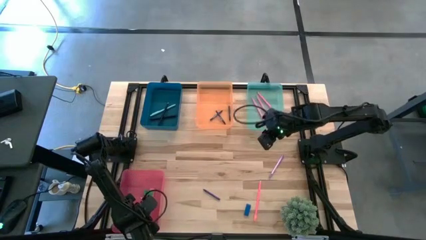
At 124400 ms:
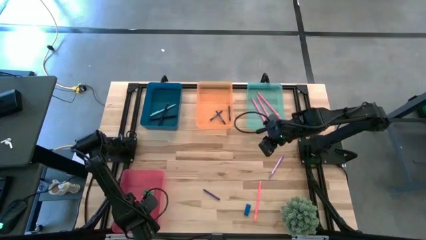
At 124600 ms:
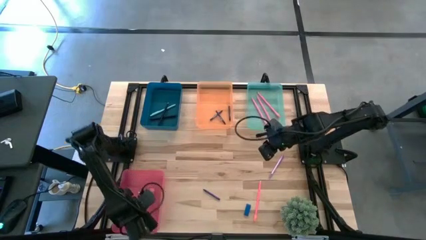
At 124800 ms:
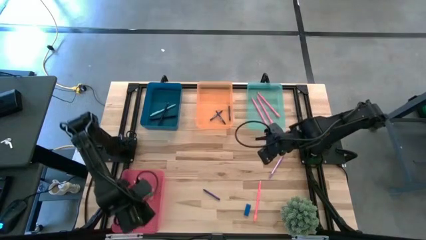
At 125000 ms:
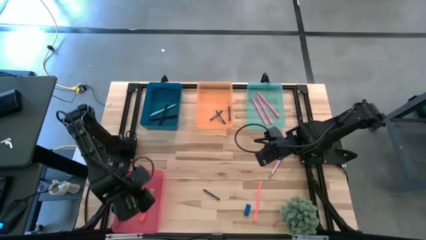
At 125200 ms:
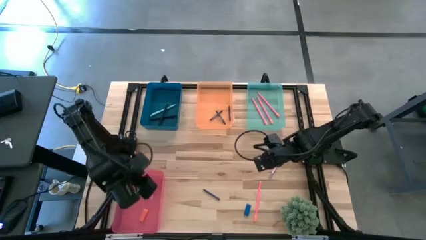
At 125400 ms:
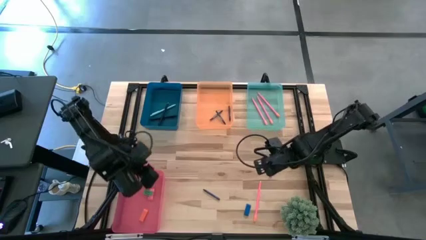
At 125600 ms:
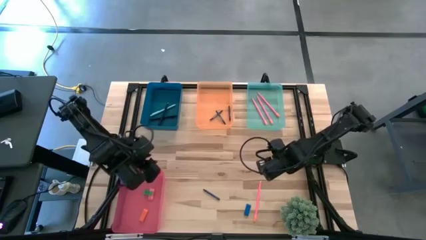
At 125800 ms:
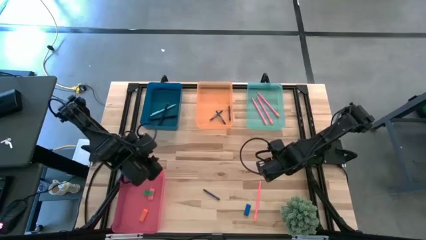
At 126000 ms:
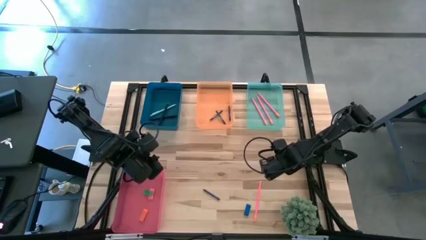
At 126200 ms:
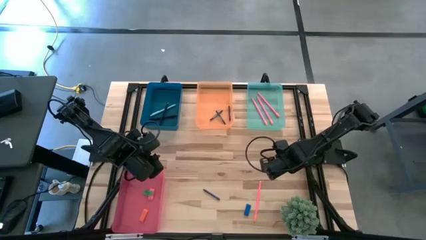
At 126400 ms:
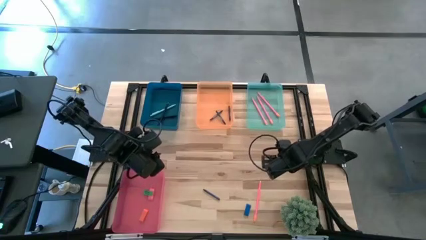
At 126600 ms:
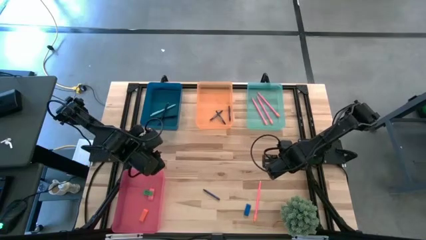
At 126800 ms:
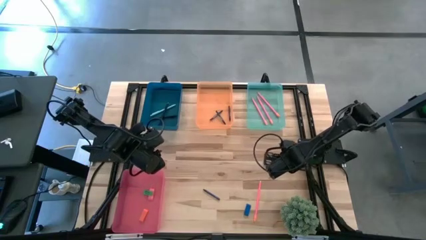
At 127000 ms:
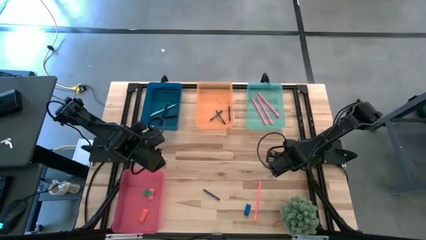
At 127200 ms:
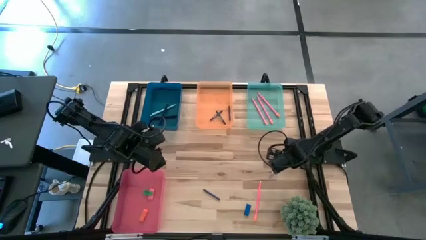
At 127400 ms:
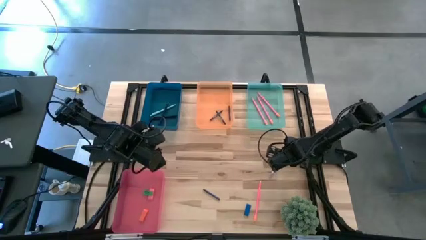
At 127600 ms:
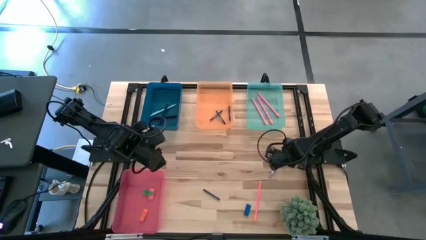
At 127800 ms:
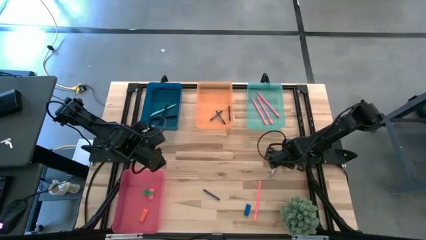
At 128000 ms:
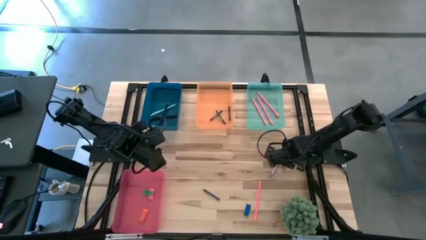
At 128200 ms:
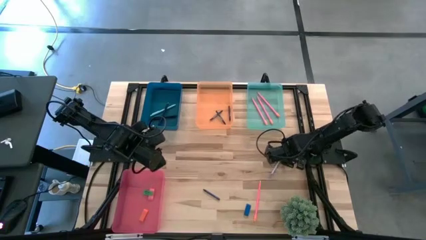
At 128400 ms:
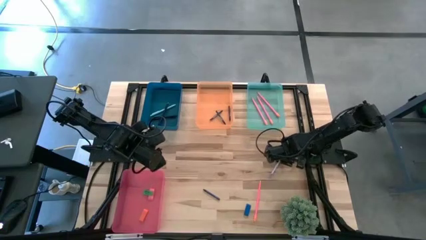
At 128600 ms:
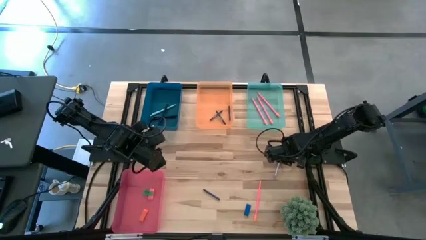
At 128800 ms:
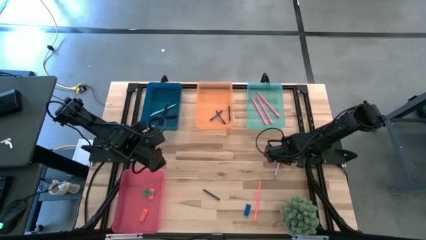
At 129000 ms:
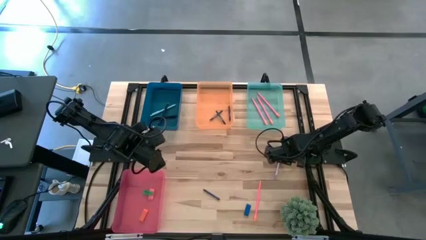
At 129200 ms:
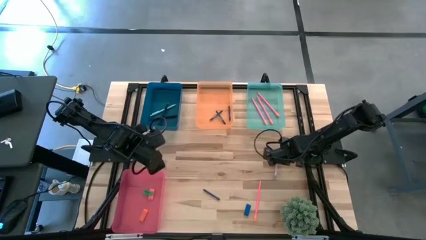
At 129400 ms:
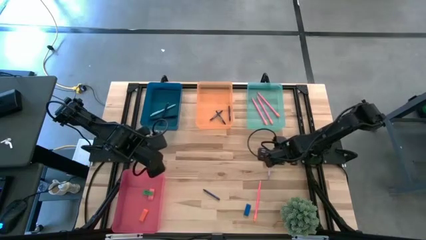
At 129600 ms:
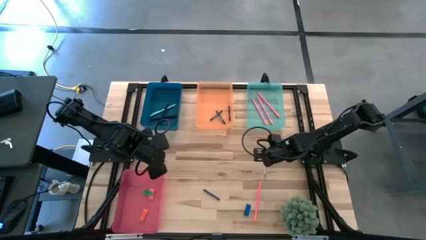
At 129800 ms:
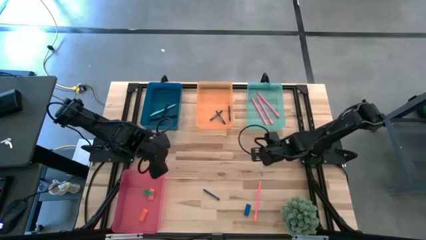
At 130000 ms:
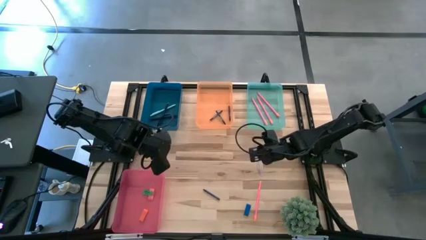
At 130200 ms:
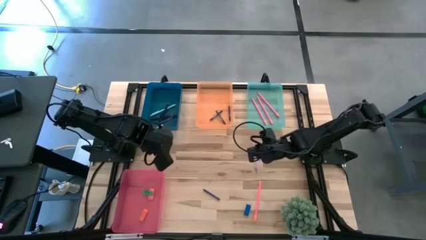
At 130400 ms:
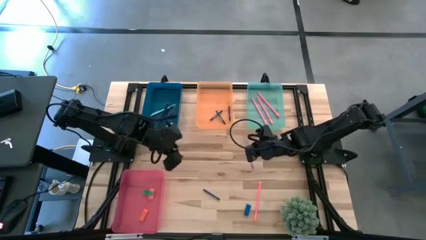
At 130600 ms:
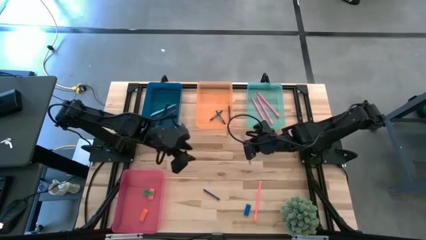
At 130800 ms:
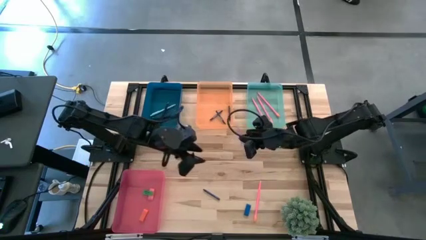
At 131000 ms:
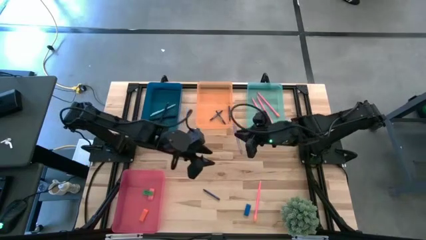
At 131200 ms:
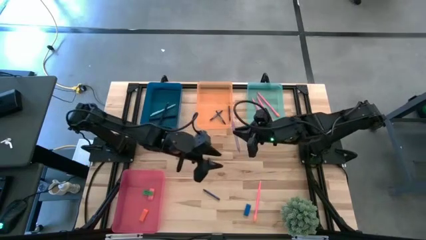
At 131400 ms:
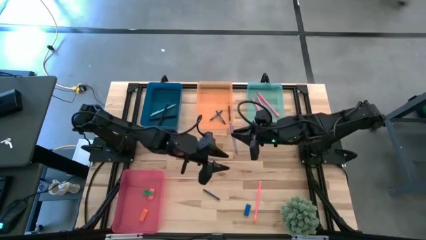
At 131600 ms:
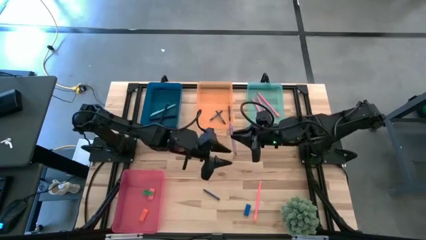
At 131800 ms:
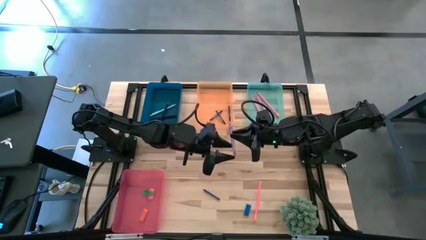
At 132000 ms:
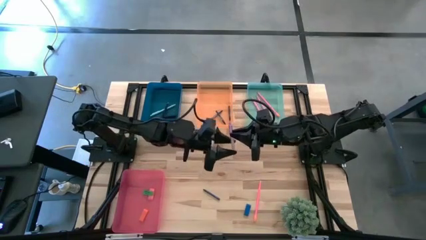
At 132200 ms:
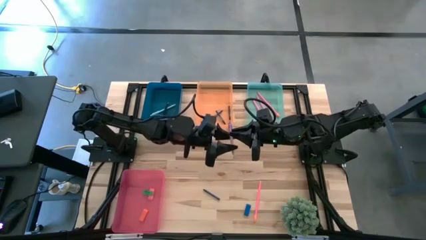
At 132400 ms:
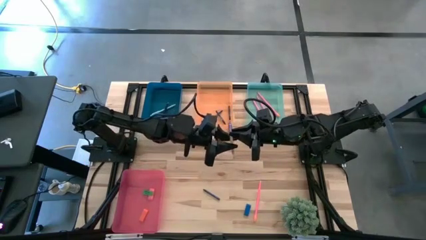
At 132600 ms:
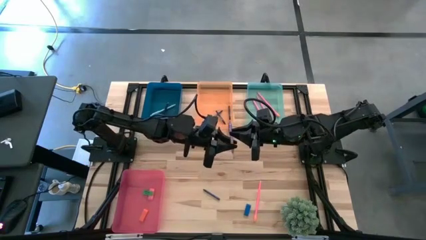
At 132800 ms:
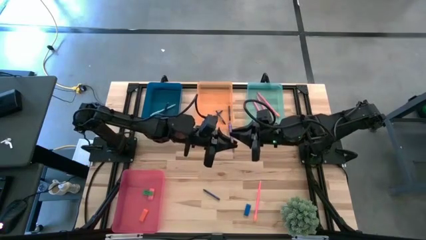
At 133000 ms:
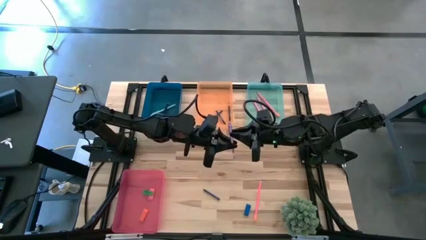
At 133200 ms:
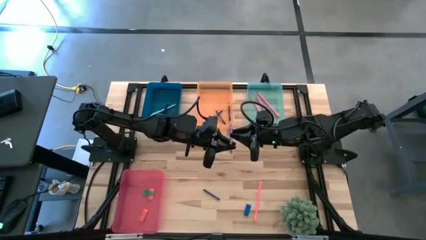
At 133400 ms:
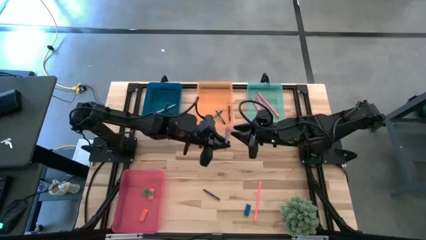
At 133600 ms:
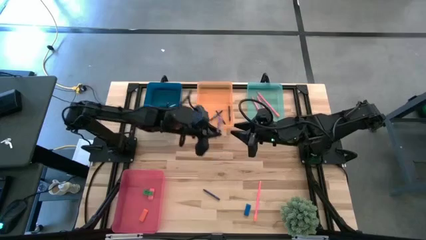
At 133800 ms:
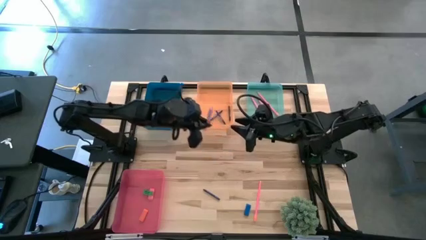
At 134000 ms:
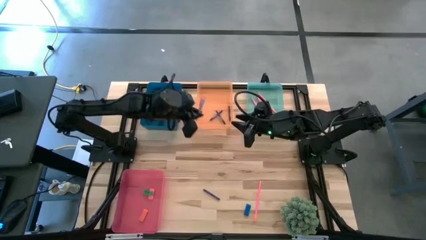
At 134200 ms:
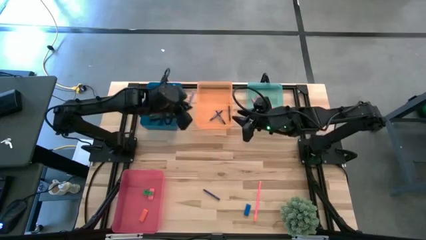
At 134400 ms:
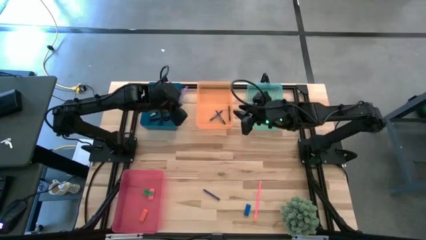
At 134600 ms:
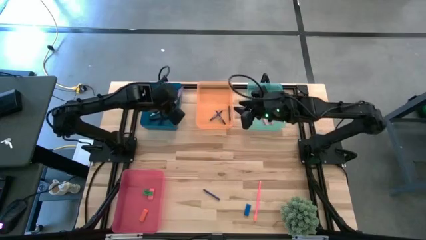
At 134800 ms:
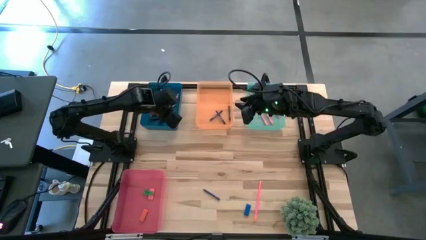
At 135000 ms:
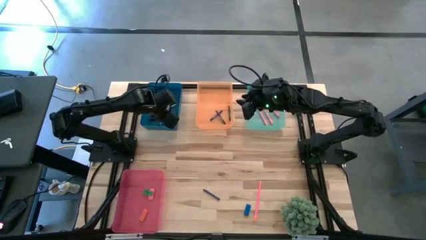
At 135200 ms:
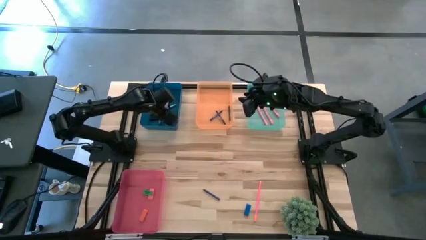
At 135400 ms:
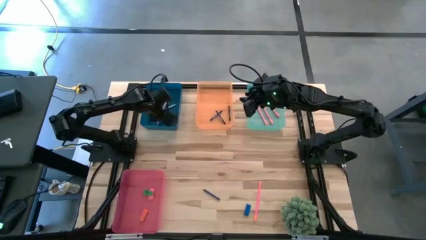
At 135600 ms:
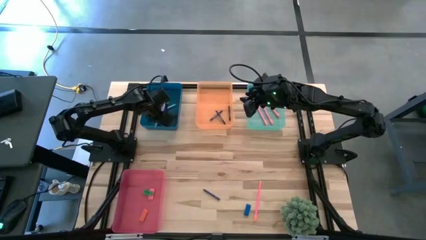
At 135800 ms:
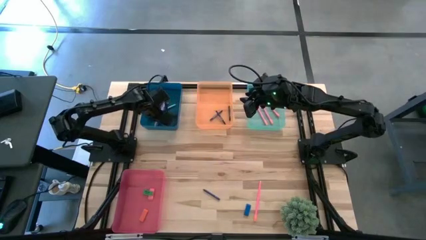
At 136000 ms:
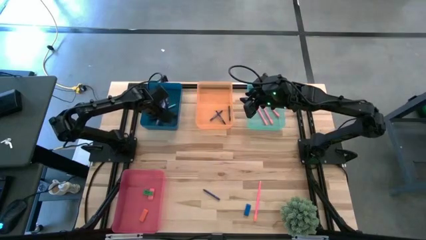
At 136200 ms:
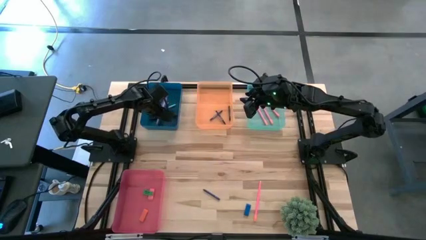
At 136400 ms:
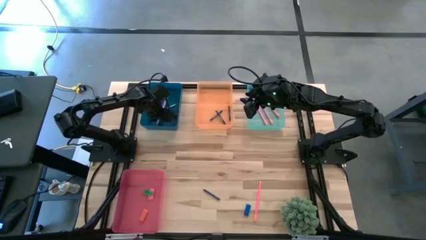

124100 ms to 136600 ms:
Task: Sort crayons/erasers/pens/pencils in bins
Put the purple pen into the blue bin

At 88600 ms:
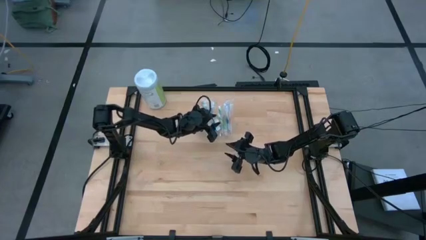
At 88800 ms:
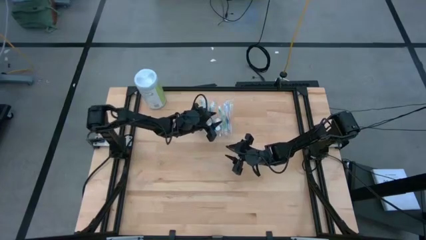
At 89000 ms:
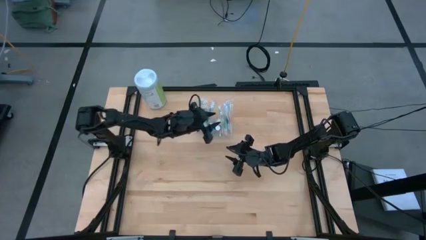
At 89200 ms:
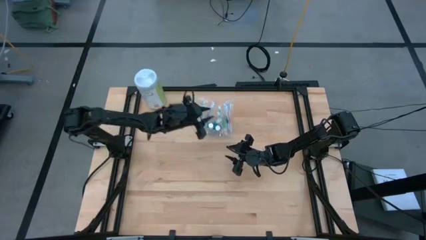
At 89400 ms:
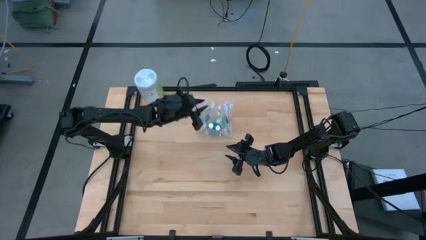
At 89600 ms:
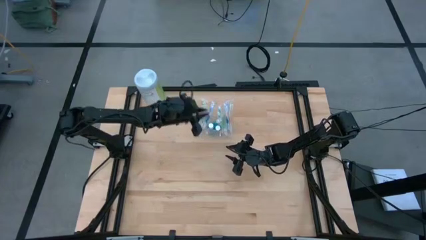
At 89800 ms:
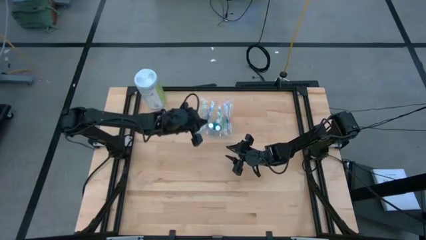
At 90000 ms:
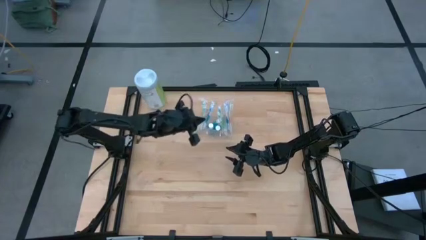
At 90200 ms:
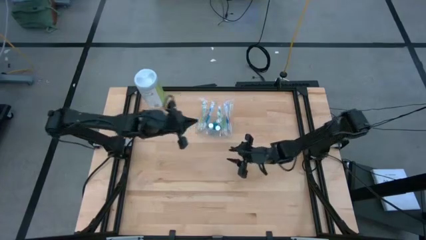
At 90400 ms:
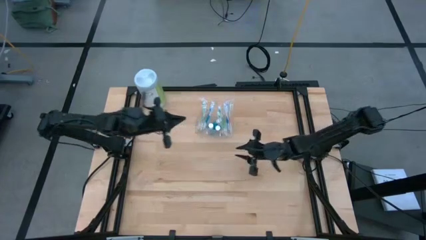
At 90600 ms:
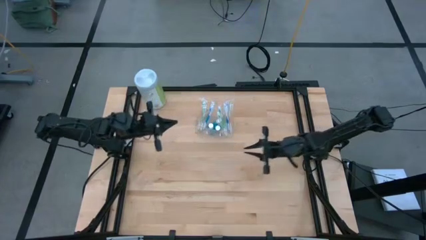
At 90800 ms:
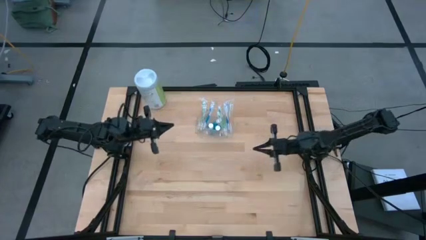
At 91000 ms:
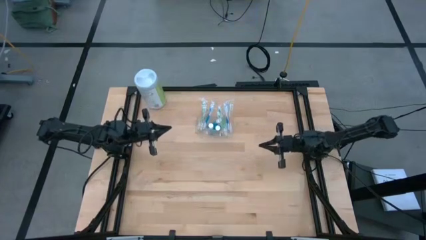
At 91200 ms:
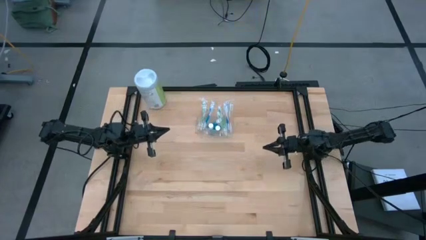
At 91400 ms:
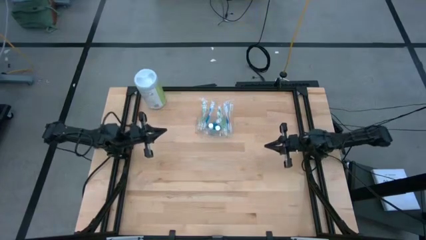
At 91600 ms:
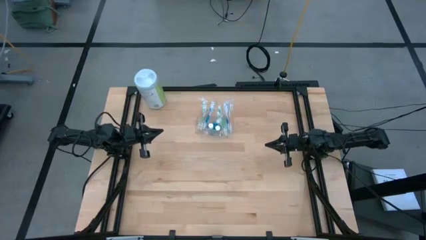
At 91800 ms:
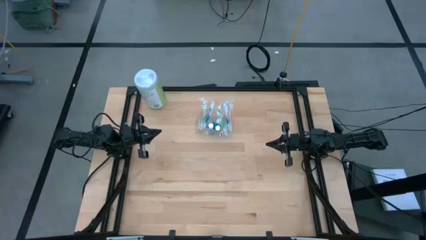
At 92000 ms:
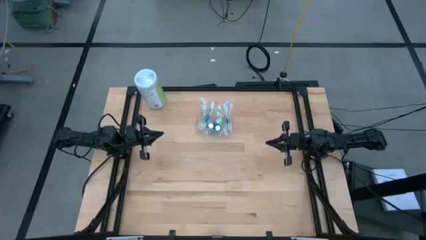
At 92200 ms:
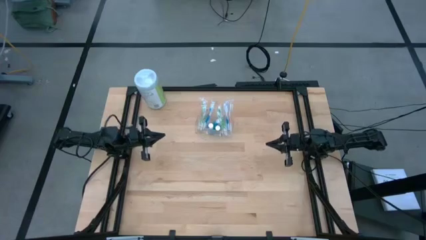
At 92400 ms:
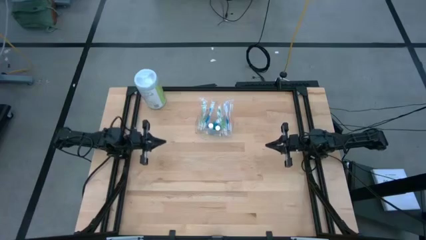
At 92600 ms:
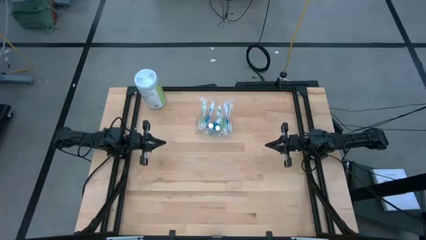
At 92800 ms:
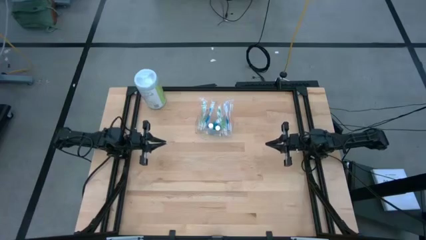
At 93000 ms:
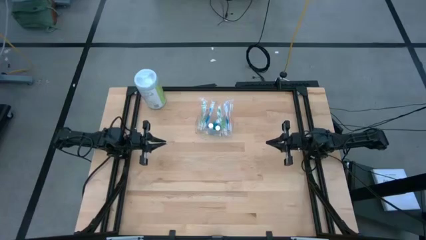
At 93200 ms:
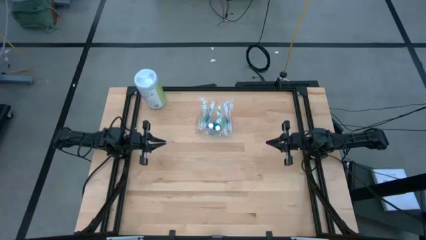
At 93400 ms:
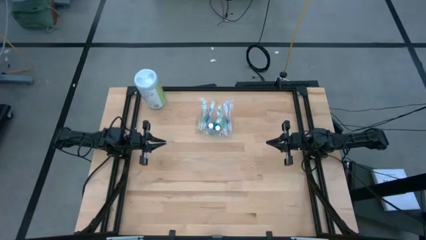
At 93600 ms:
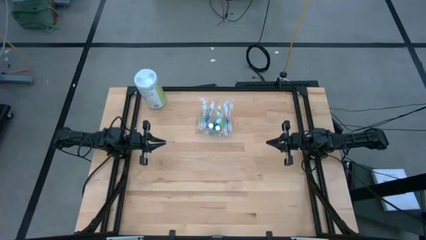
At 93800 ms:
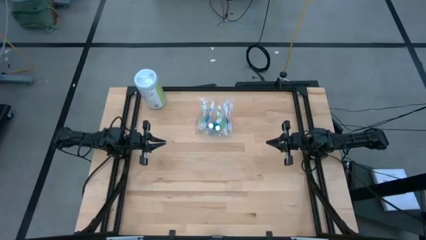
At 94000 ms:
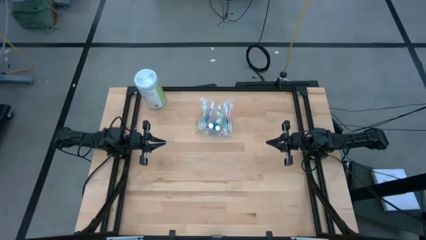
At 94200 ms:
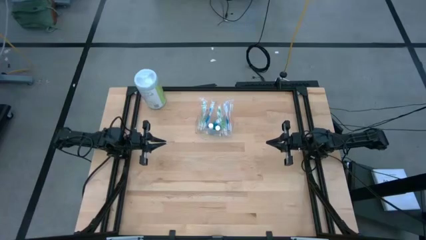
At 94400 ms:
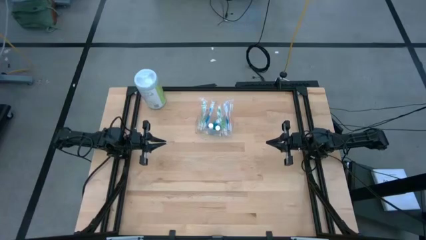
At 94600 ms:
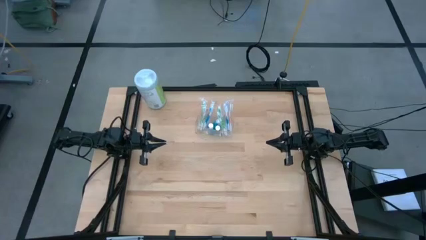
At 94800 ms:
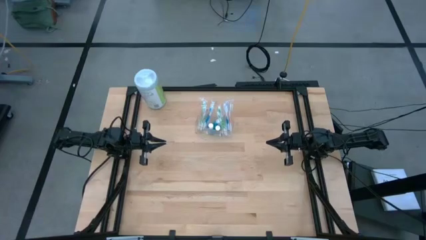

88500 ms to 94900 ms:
Task: Pick & Place toothbrushing station
Return to Home Position
